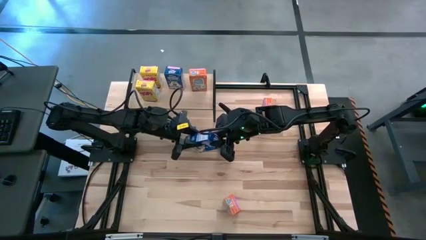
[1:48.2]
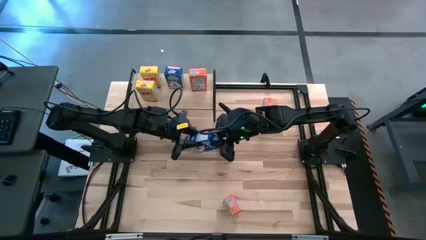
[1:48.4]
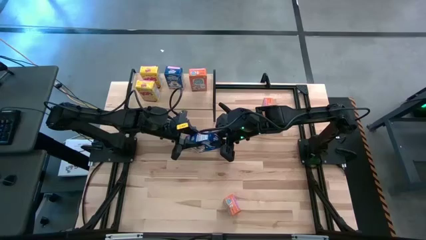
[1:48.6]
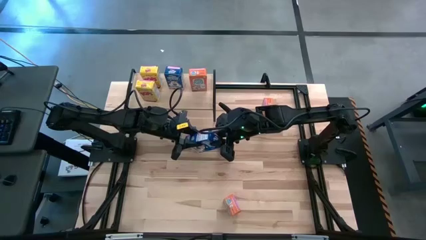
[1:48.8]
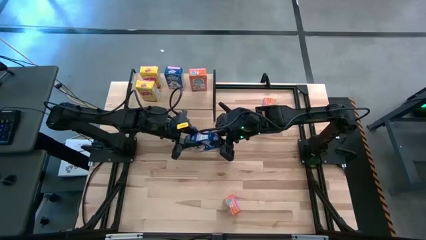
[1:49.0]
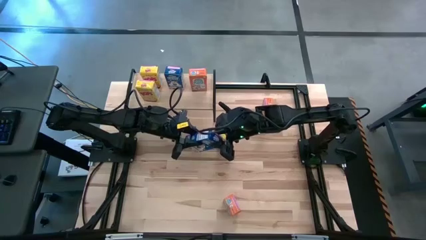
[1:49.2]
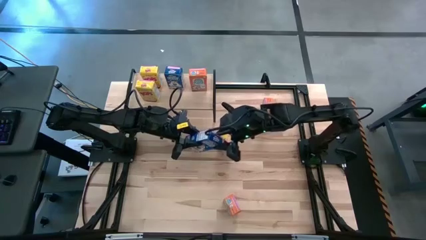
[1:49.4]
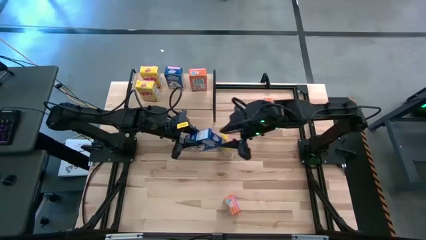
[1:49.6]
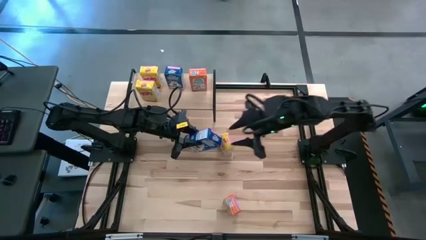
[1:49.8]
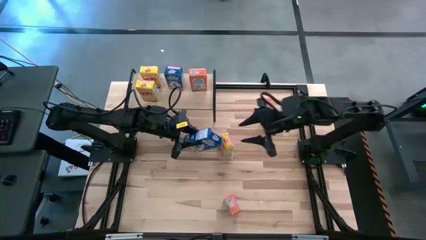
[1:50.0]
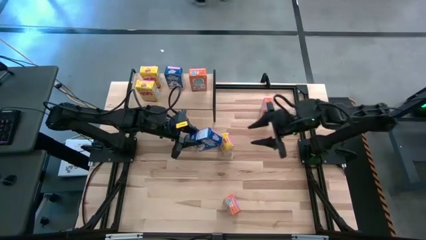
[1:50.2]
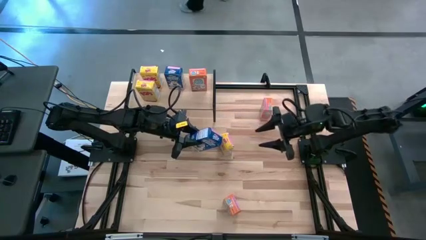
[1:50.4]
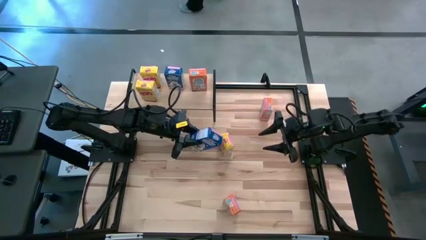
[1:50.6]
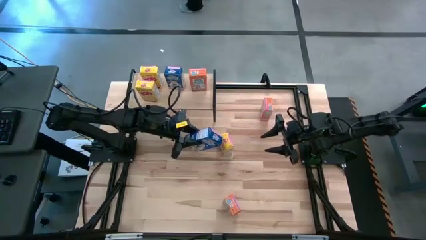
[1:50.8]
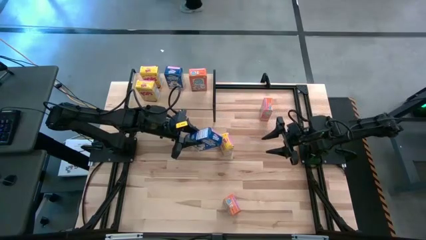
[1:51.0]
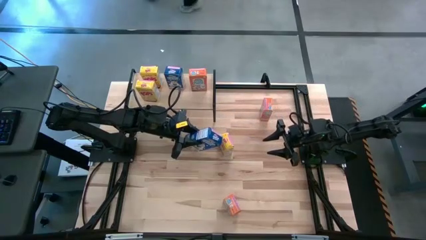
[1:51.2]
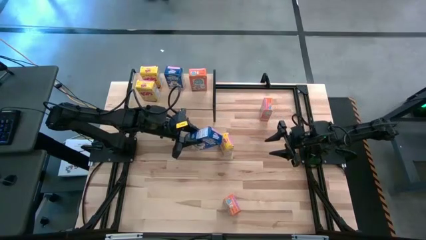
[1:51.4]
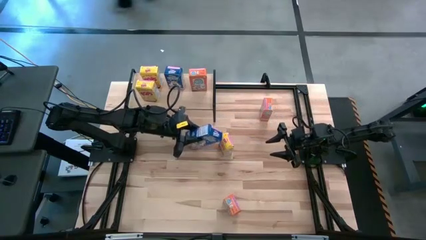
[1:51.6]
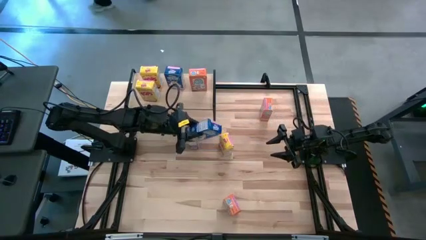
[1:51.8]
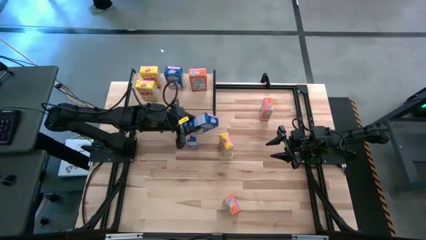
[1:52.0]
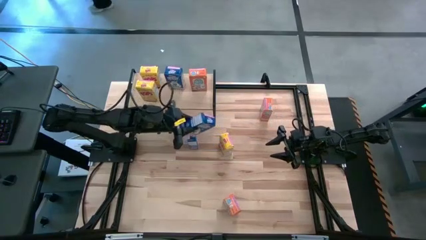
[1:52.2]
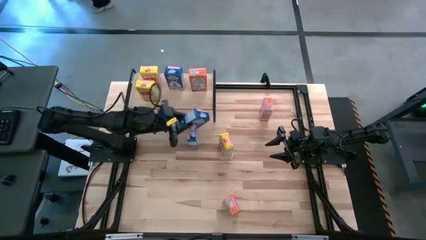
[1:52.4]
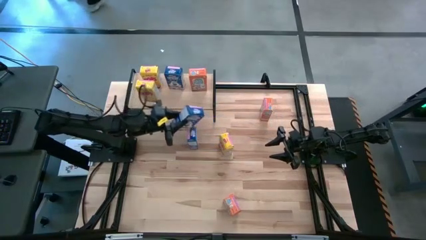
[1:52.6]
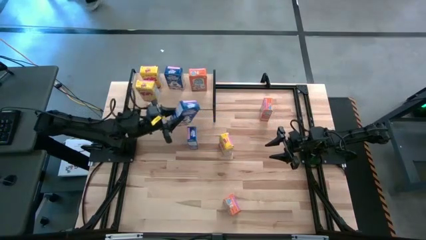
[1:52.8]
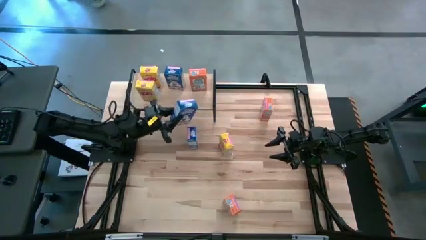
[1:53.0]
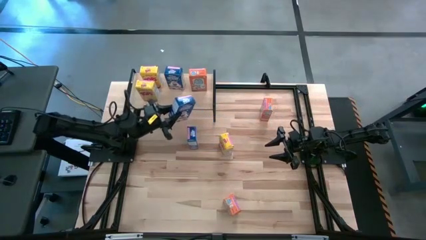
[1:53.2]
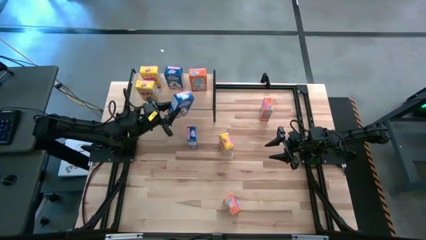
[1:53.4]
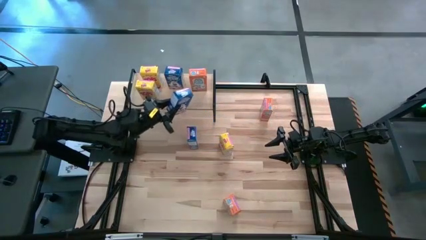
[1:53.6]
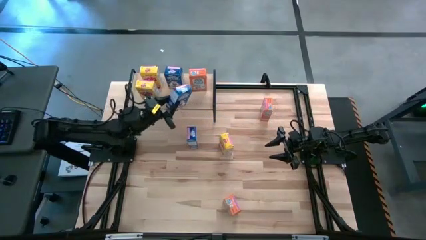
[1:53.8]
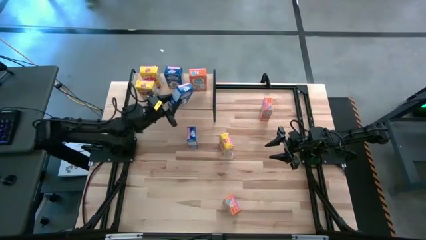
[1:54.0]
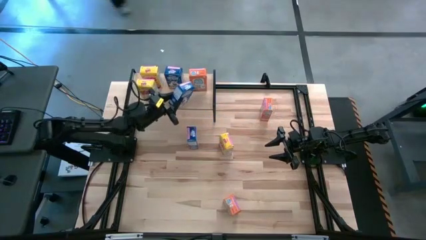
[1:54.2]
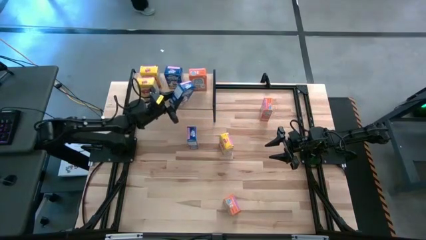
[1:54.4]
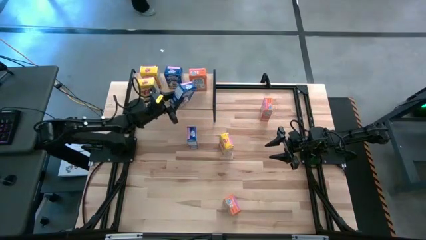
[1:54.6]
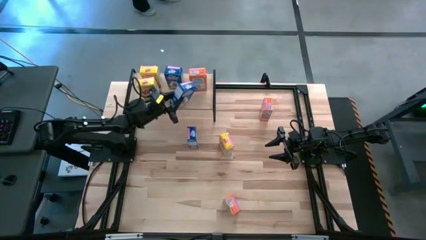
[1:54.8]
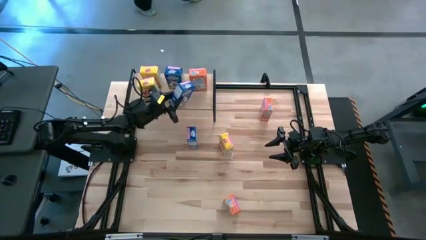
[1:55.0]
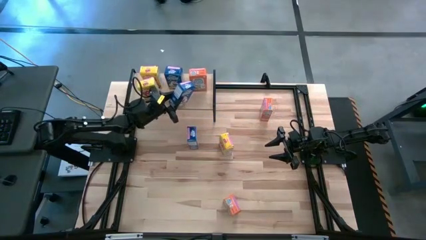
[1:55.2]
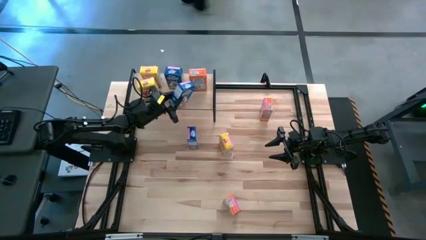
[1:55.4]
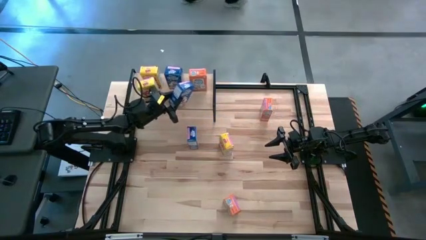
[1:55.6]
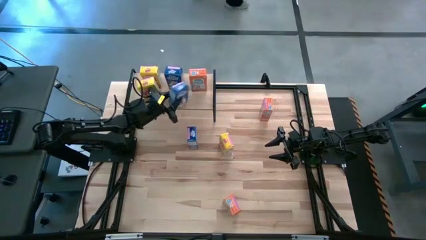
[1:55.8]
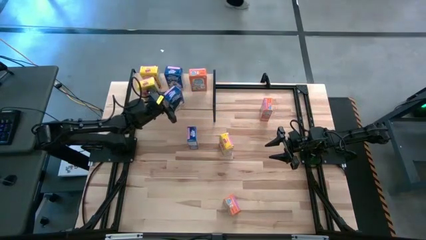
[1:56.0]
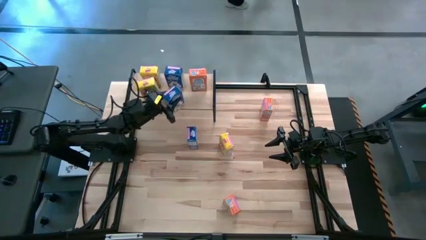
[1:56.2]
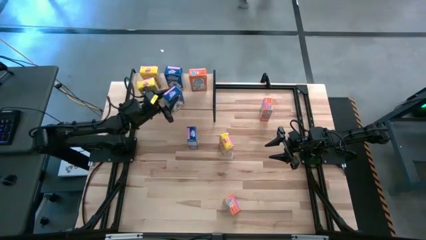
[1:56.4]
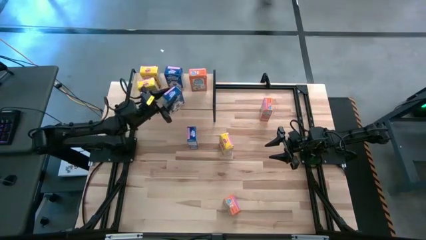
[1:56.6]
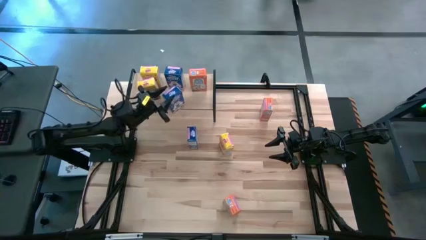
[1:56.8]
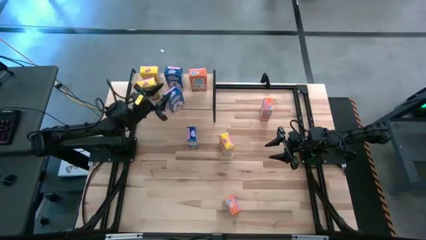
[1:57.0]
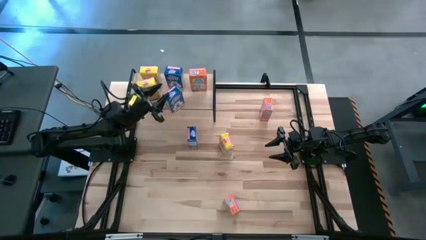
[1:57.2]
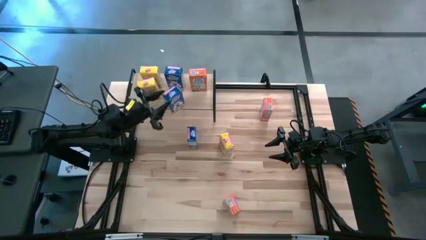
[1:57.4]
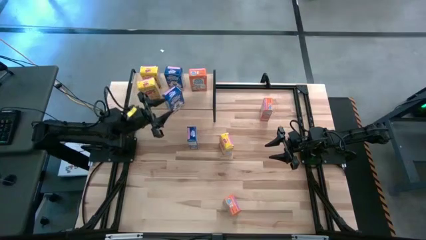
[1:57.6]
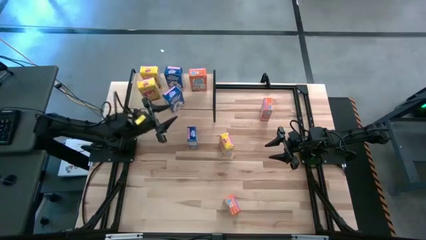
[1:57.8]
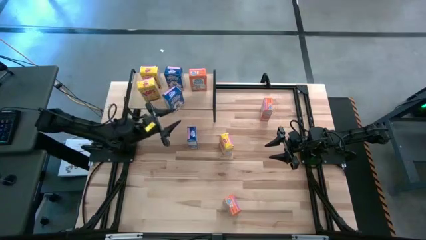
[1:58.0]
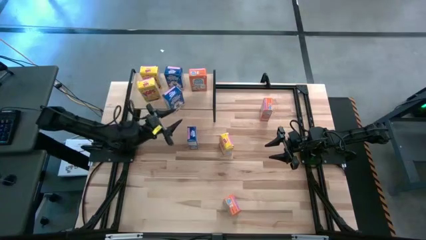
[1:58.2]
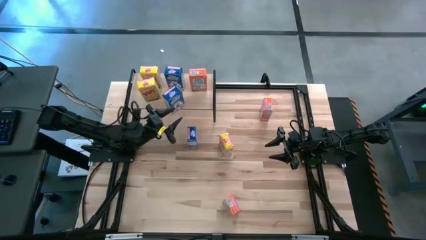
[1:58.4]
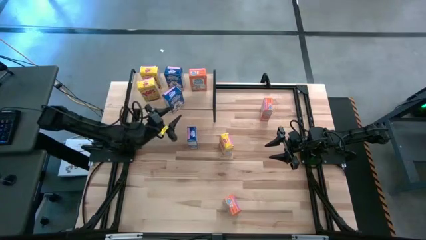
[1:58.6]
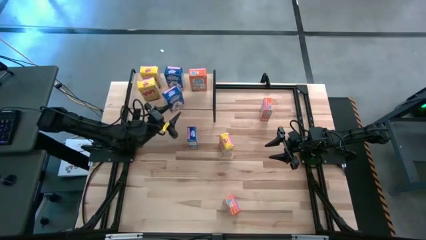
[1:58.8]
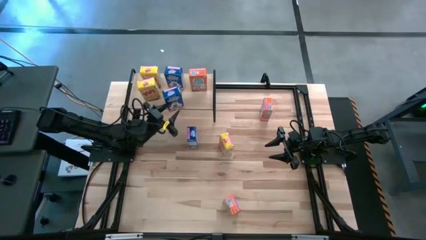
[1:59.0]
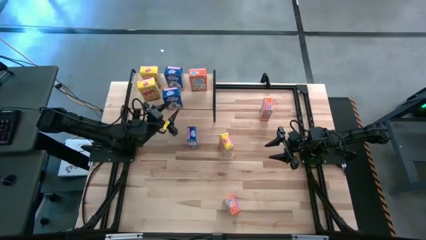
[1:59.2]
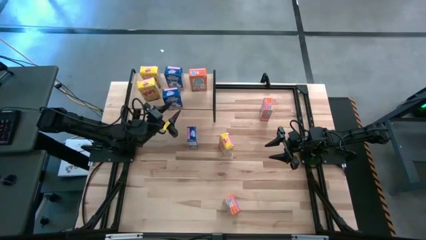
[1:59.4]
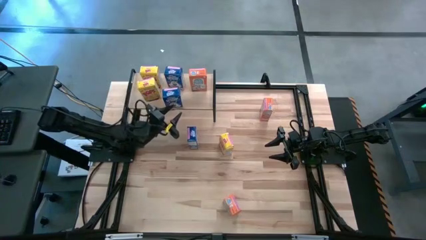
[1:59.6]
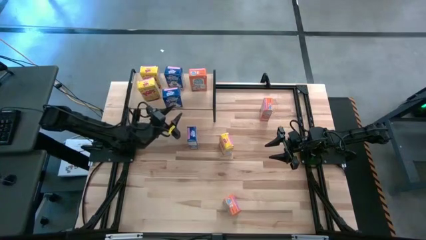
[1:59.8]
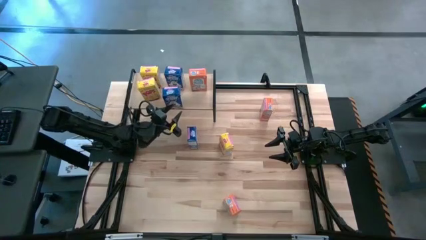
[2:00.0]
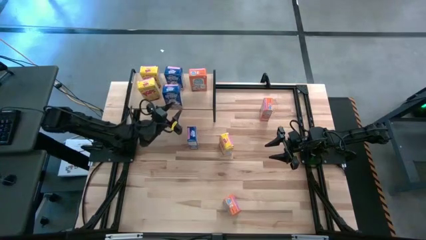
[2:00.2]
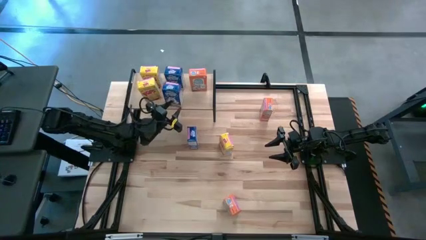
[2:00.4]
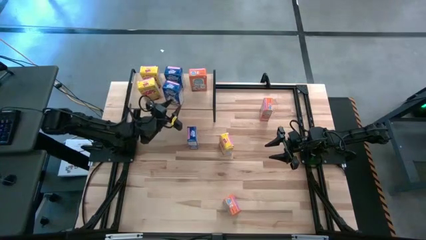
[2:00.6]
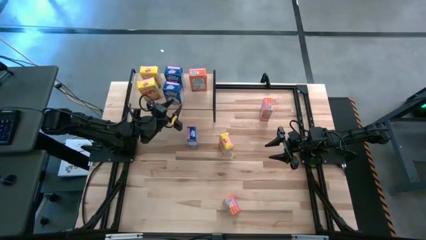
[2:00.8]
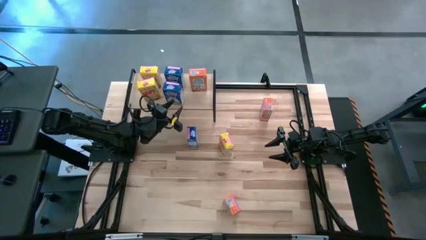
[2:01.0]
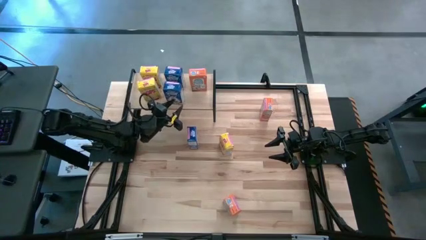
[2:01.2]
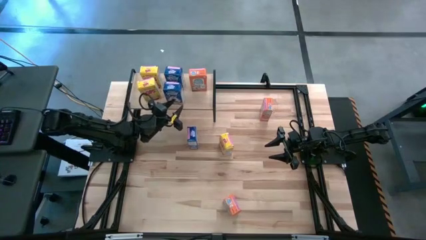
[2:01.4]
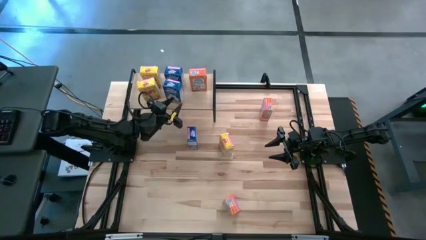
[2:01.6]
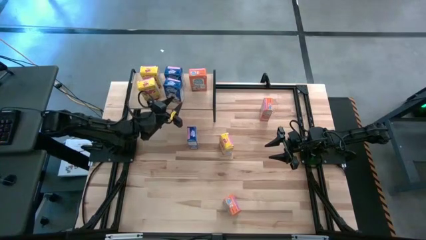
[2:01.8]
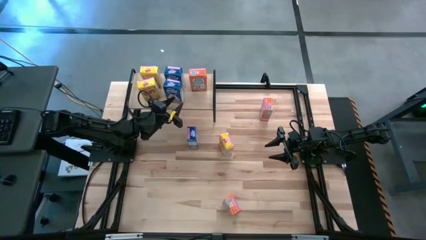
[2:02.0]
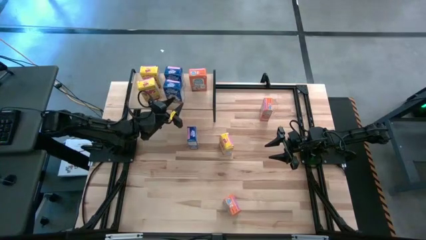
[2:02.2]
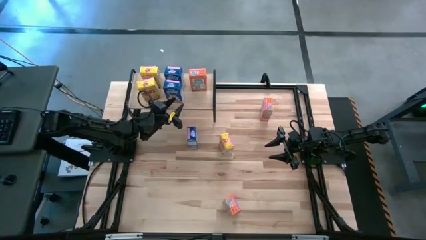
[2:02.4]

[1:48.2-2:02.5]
Task: Stack cereal on shelf
Put the right blue cereal box on the shelf aligned with the other blue cereal box

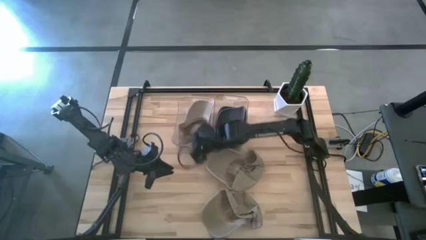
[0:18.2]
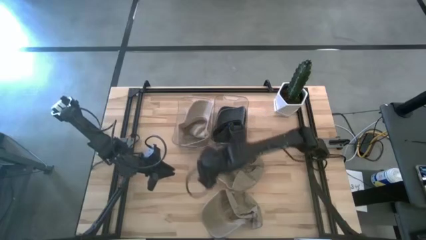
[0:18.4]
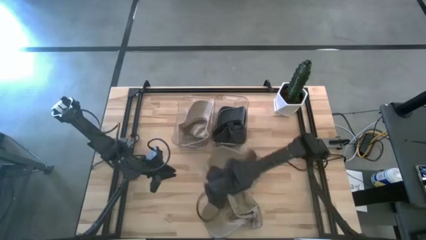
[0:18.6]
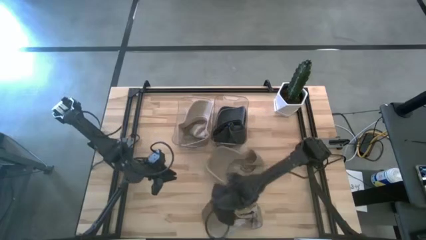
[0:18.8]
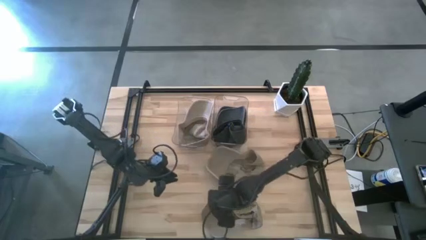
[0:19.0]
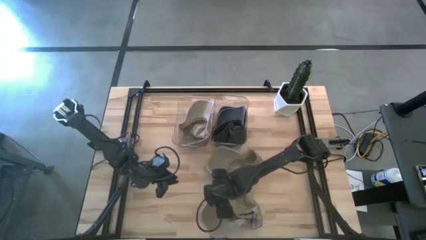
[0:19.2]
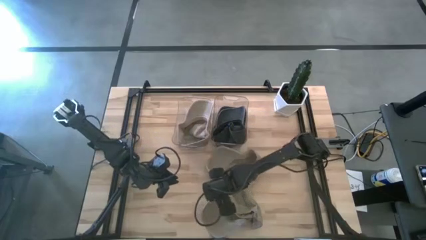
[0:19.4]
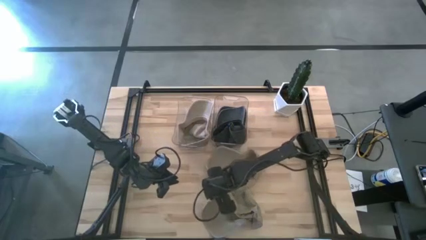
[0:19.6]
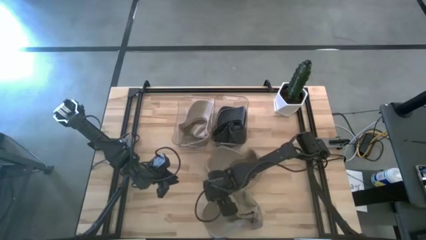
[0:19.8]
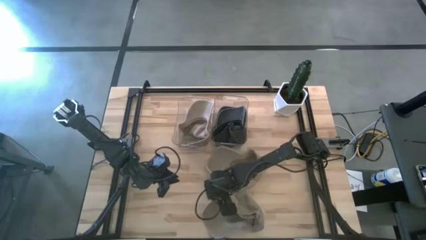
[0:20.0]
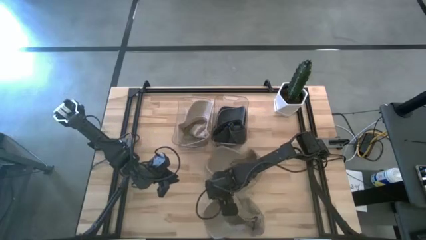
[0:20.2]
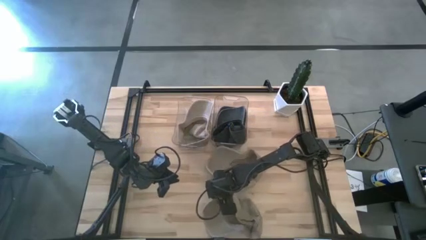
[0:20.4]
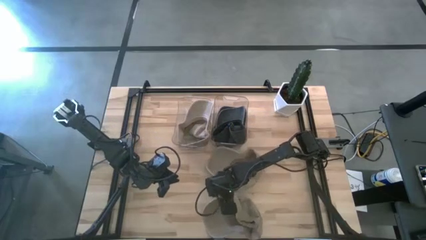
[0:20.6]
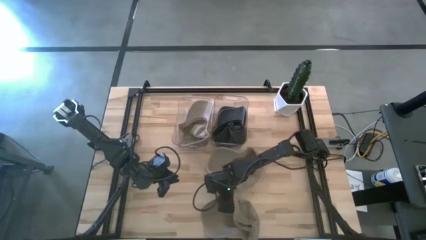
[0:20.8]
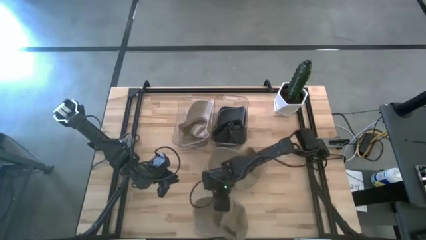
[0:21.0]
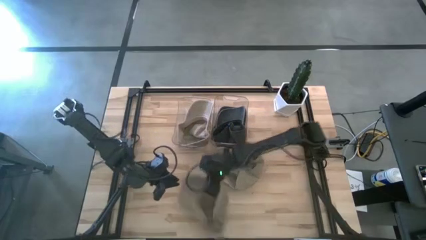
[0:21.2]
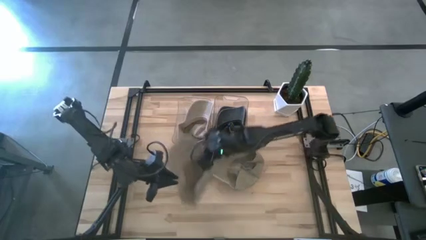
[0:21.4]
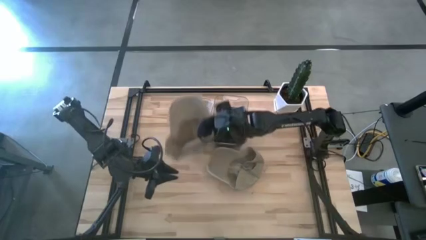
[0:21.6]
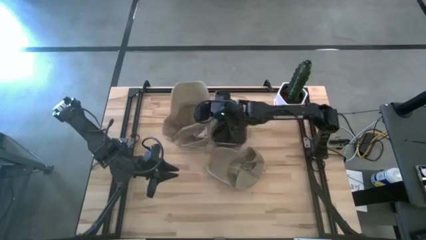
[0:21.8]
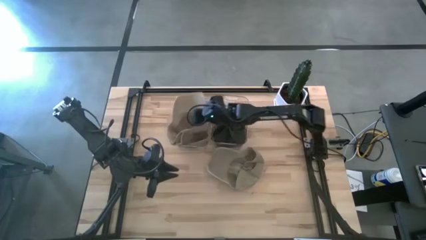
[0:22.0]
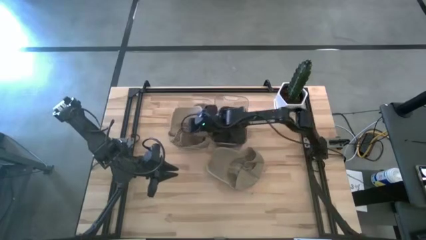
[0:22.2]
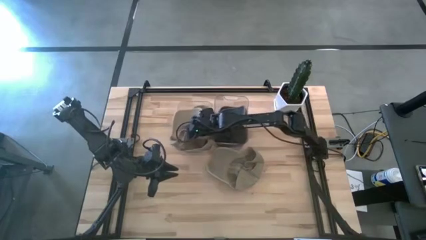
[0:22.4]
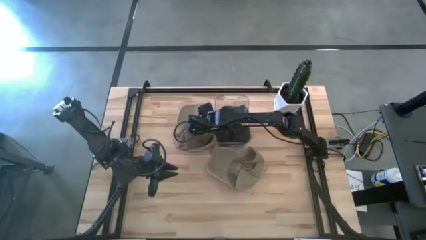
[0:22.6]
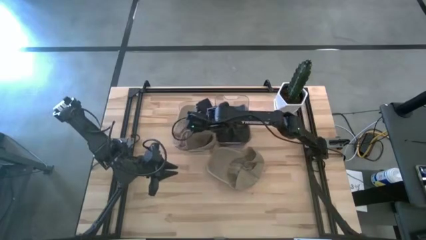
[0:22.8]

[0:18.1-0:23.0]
Task: Pick & Place hat
Put the bottom brown cap into the left transparent bin
